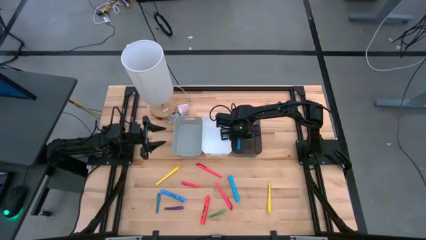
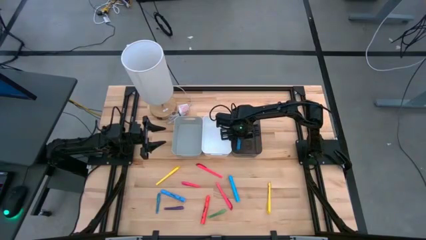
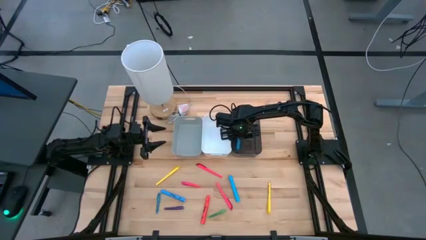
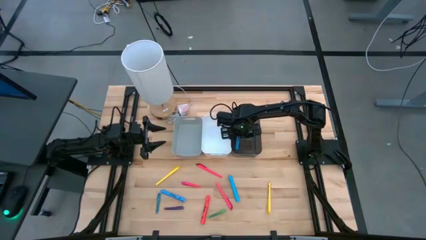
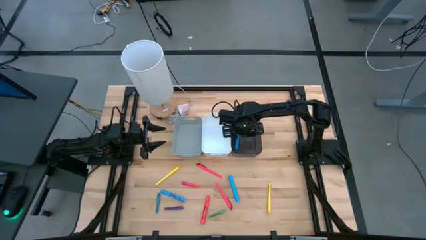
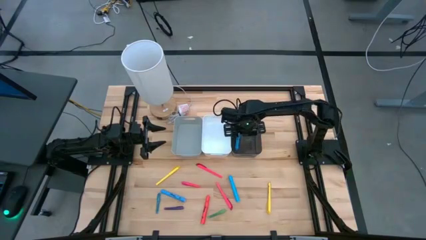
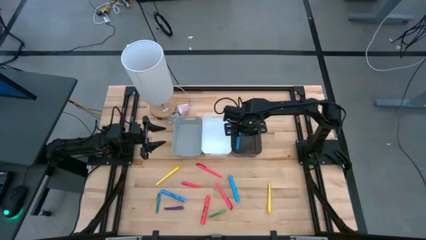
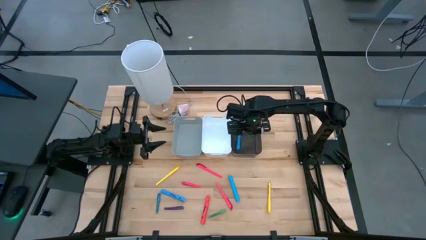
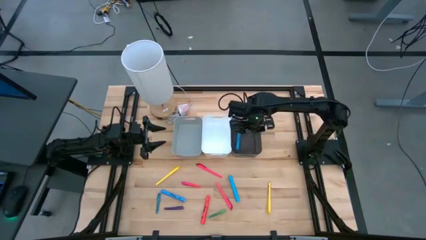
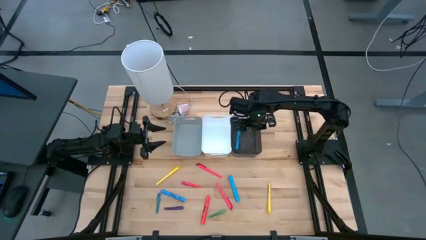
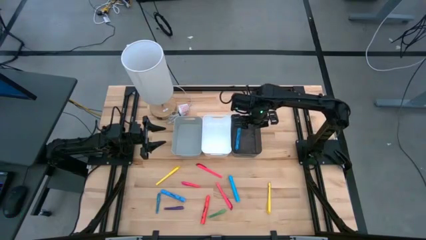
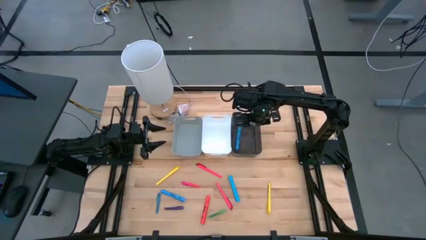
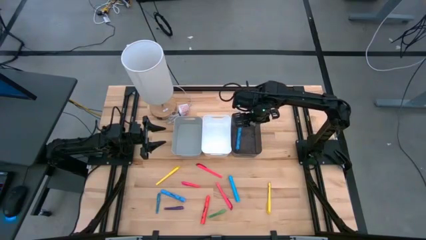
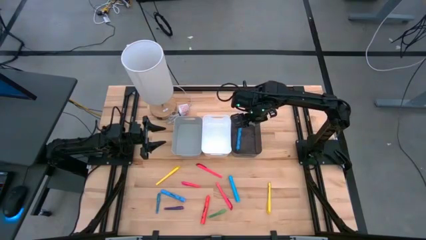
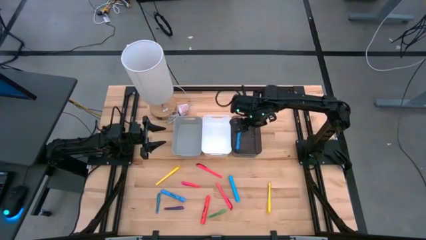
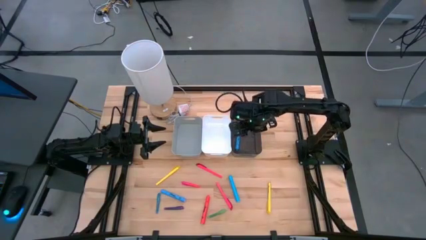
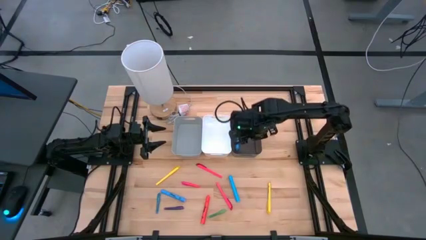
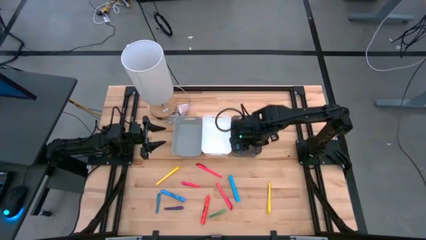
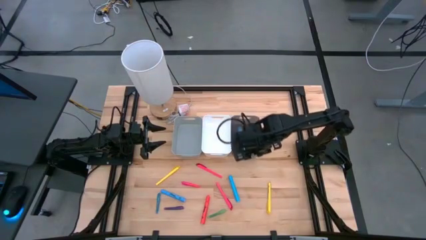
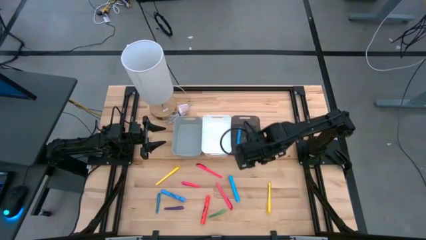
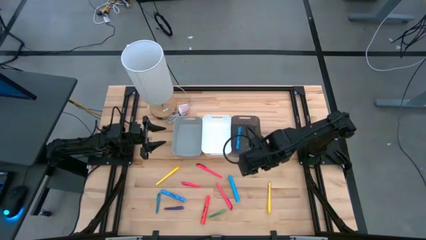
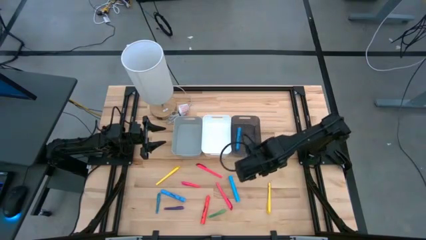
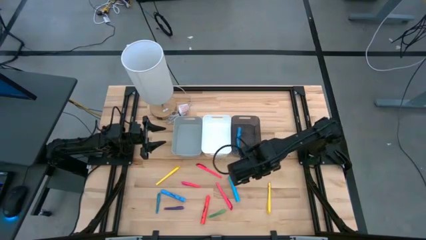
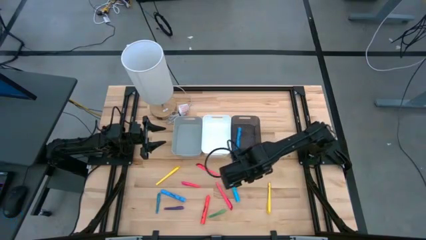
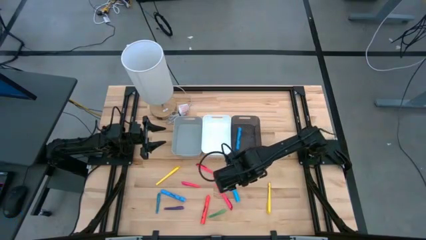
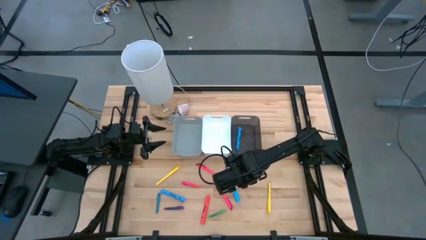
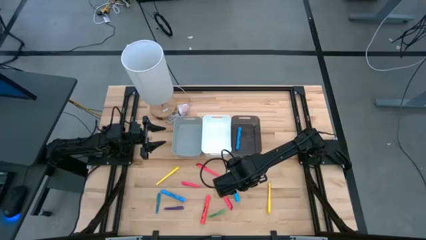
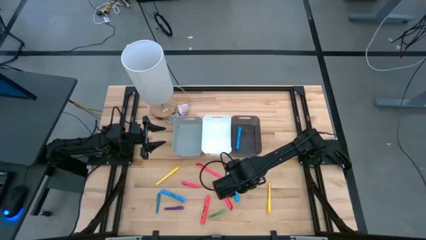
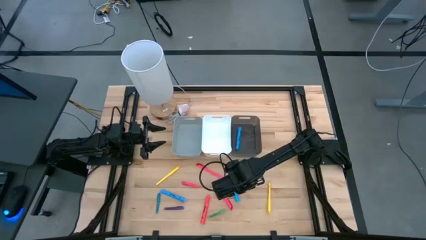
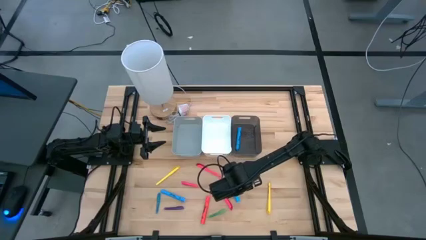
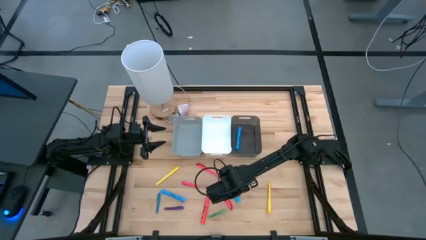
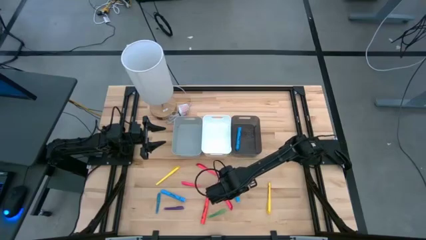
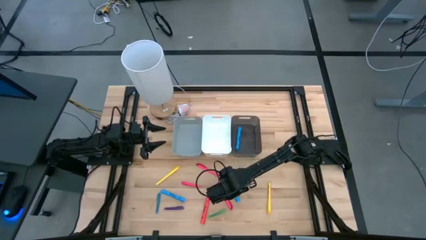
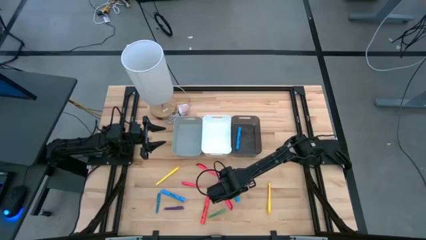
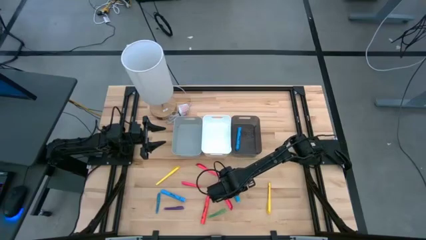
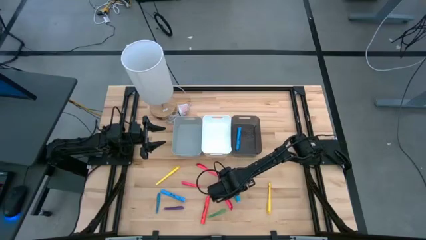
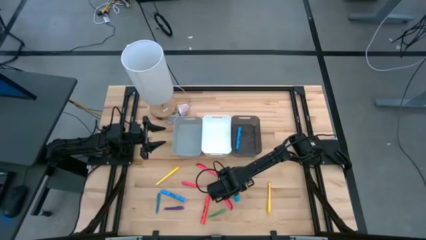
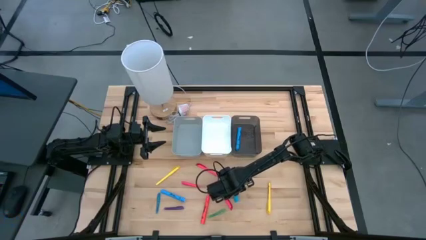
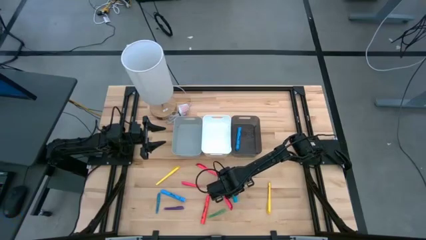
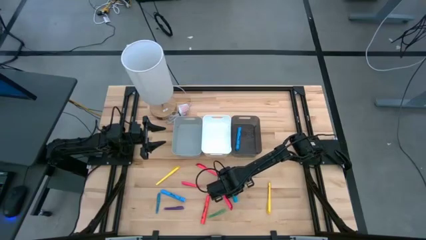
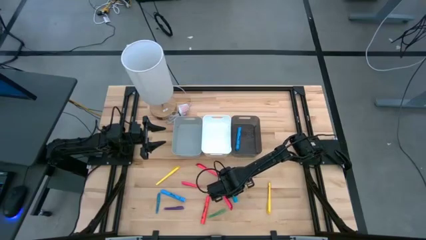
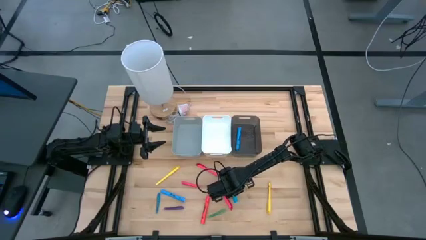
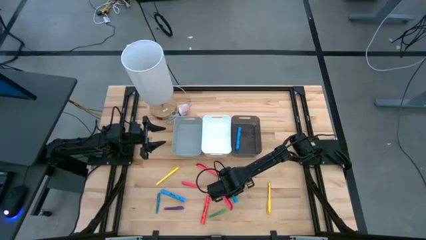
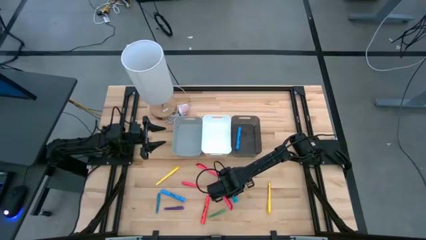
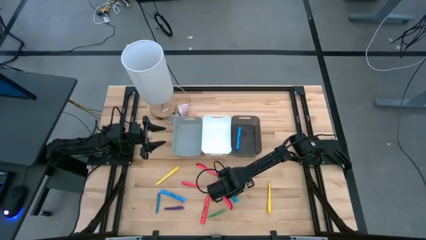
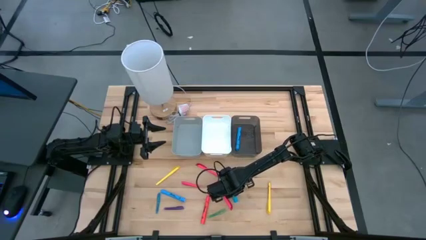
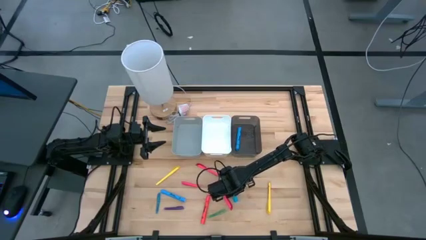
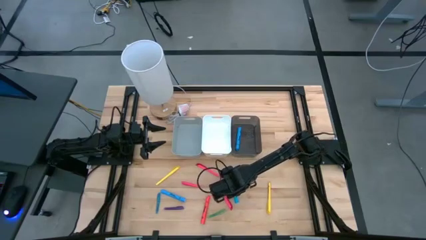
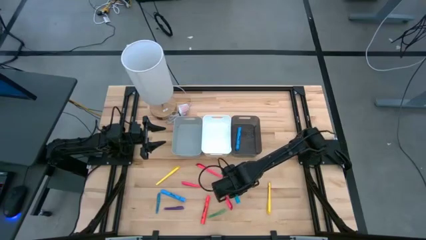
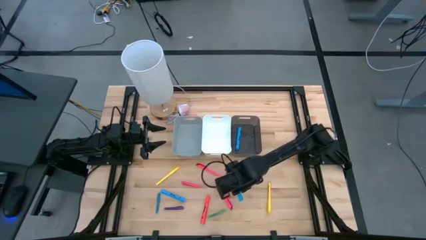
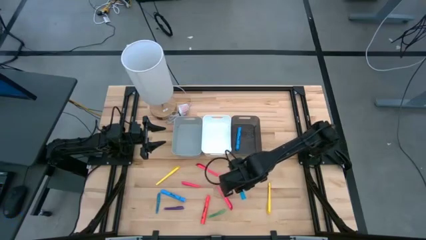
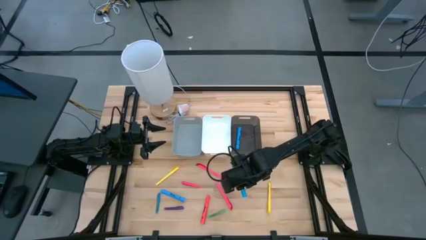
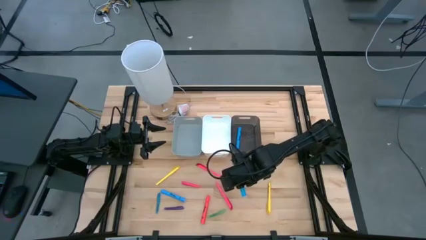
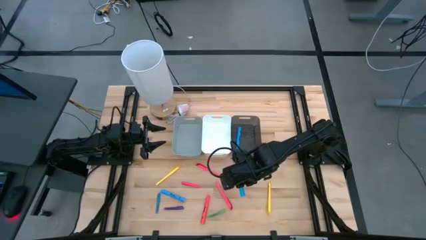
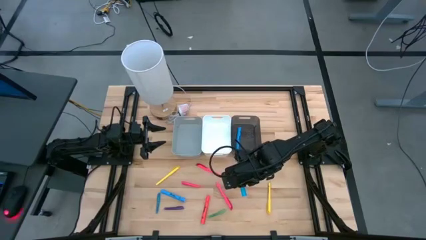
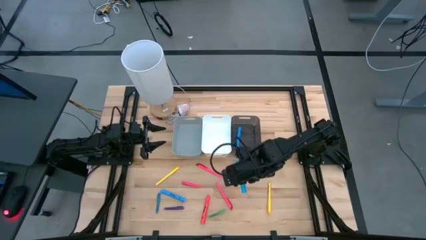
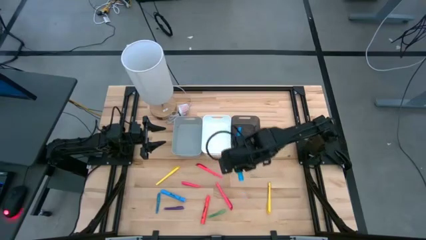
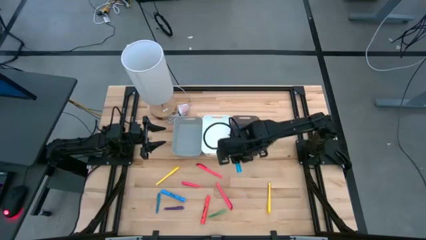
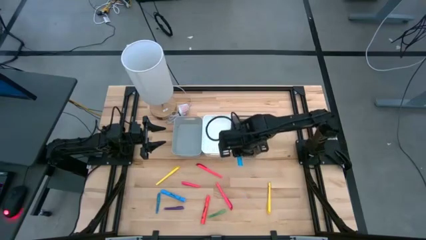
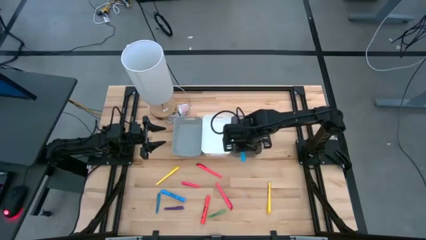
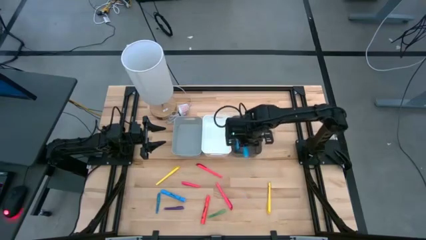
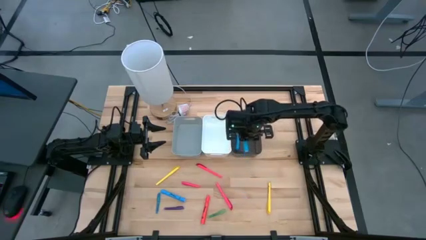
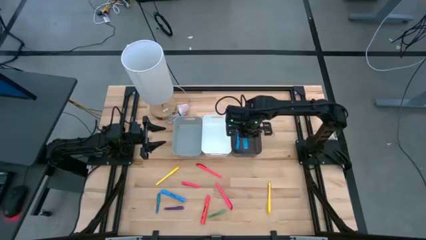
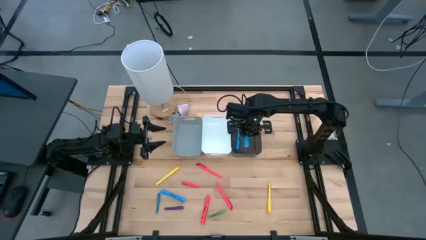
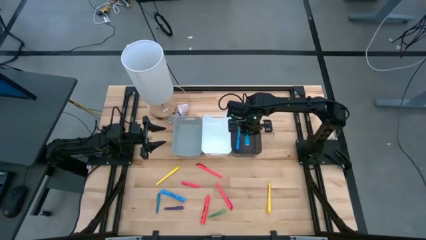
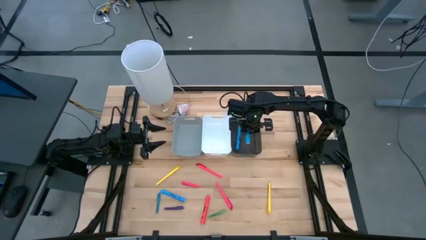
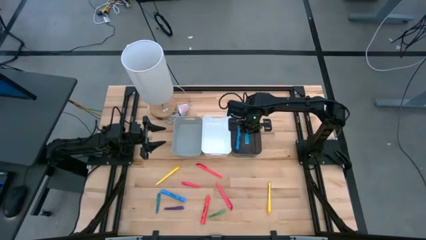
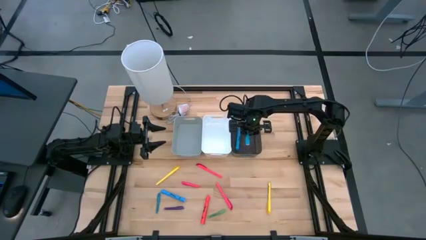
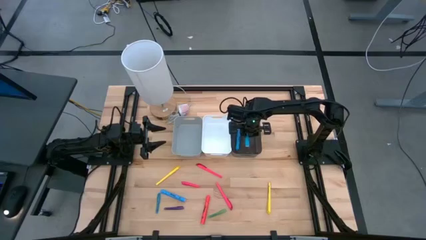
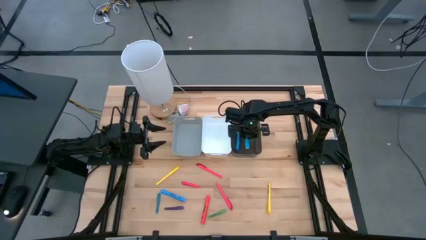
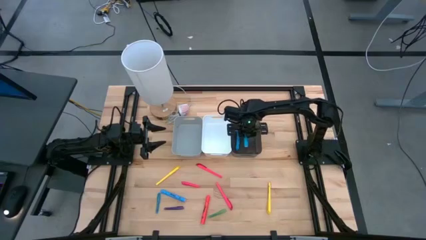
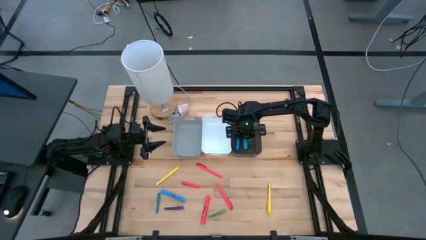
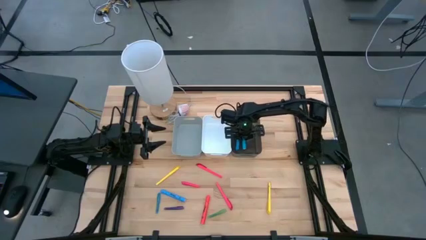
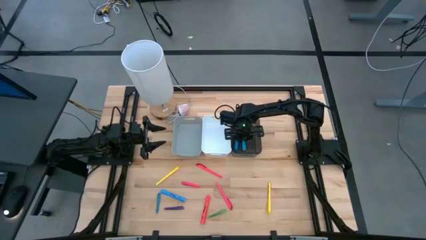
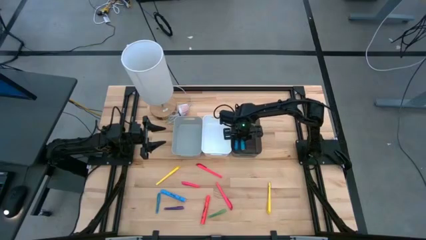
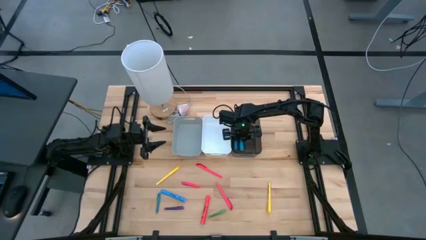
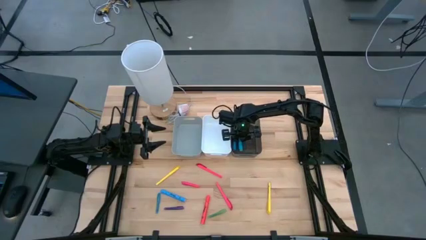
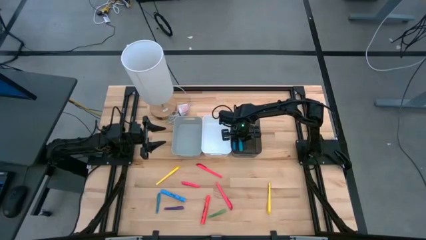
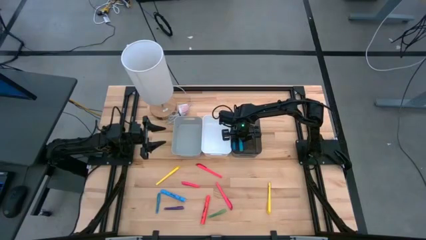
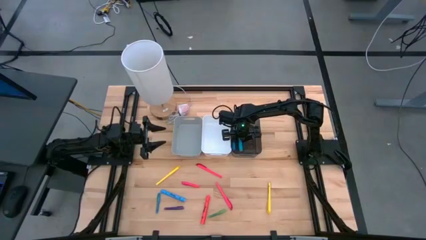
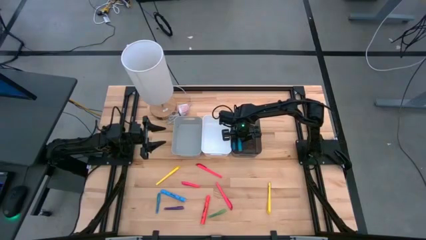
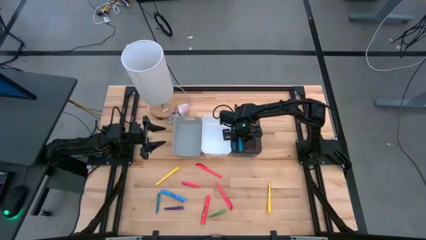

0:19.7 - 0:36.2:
Task: Pick & Place Markers
Put the right blue marker pen into the black bin

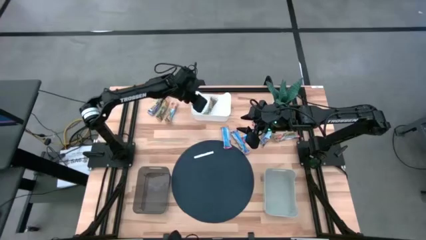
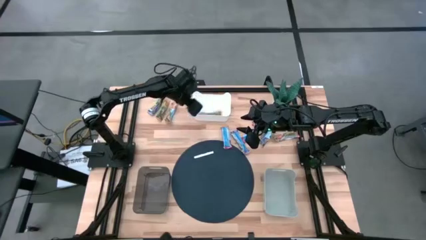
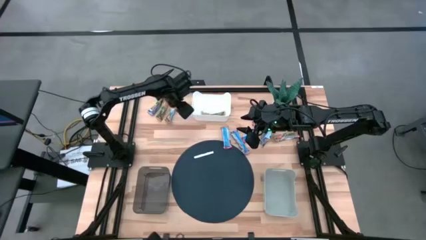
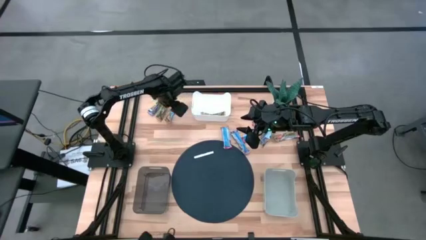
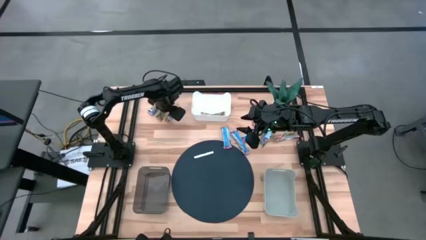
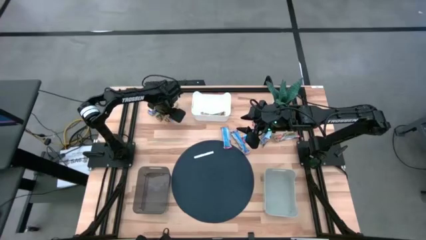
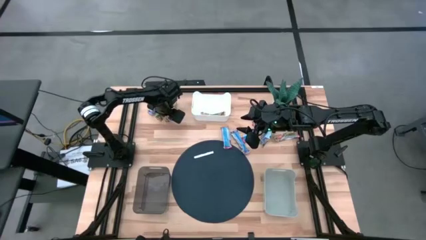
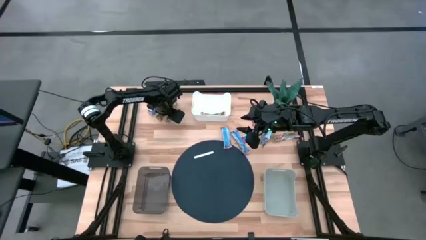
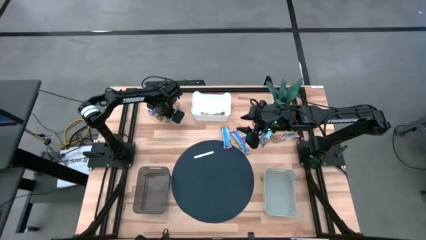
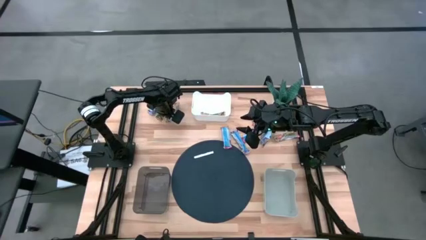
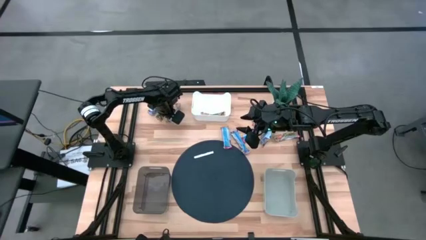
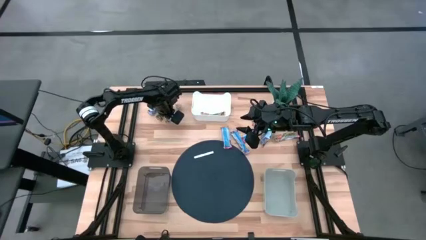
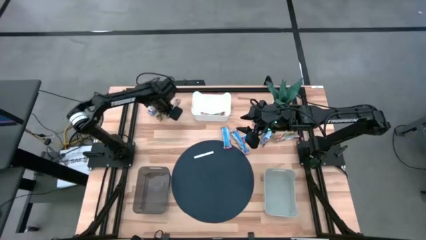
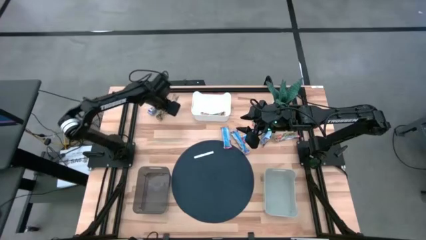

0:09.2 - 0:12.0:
Task: Pick and place Granola Bars by type
Put the yellow granola bar into the white bin
